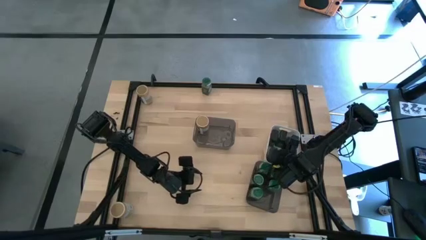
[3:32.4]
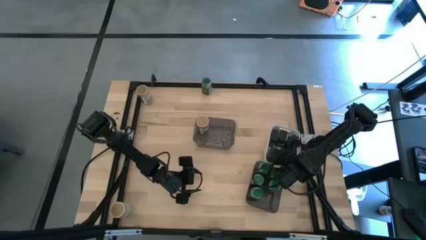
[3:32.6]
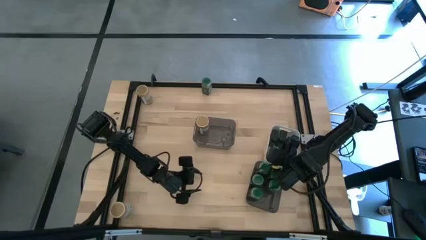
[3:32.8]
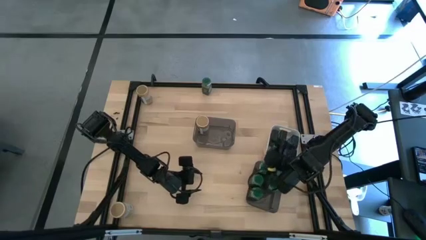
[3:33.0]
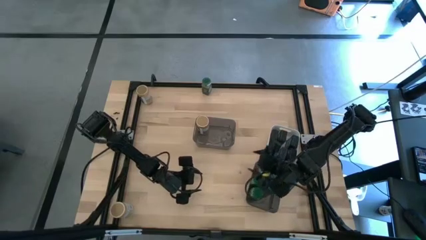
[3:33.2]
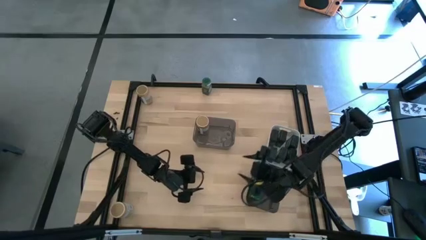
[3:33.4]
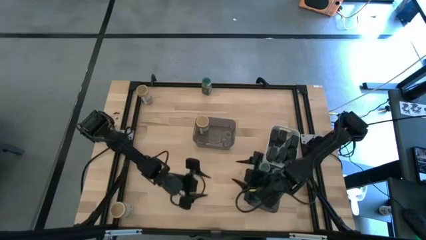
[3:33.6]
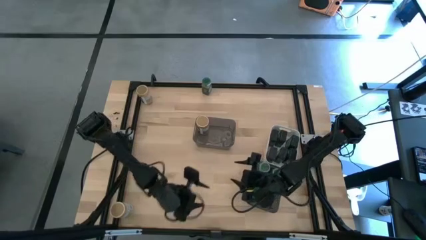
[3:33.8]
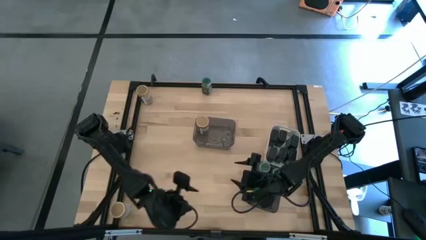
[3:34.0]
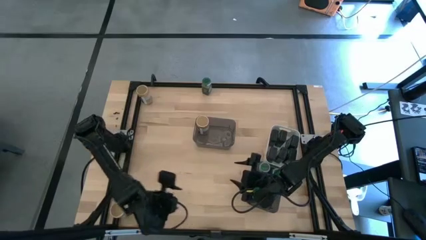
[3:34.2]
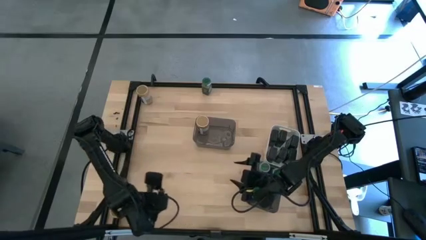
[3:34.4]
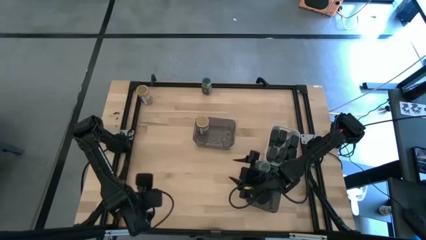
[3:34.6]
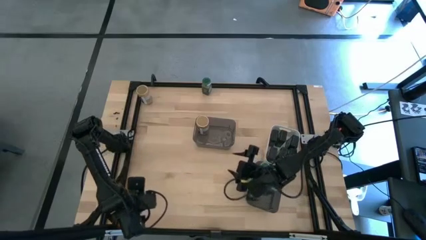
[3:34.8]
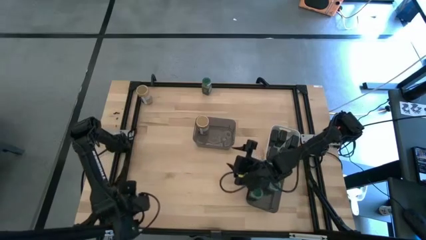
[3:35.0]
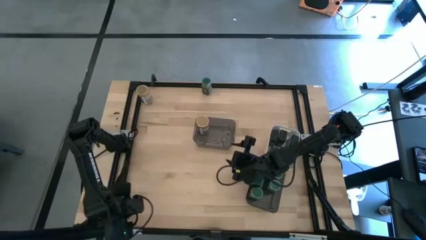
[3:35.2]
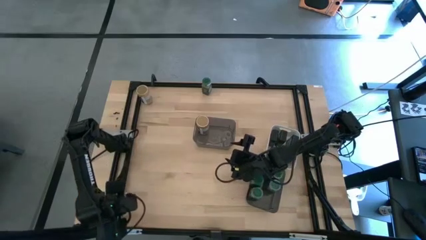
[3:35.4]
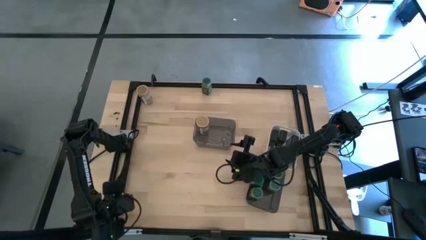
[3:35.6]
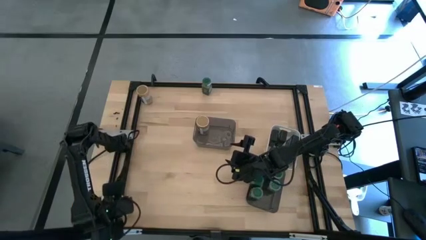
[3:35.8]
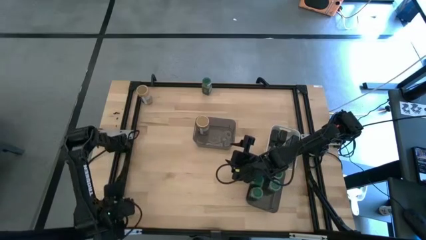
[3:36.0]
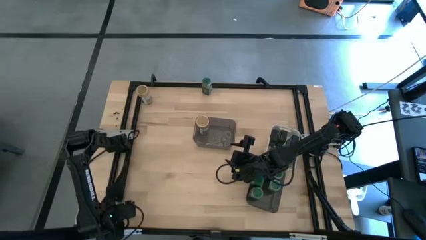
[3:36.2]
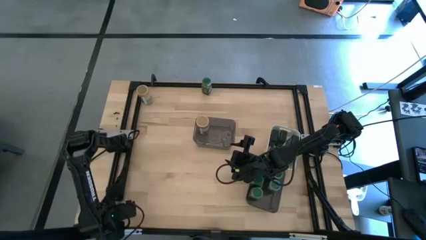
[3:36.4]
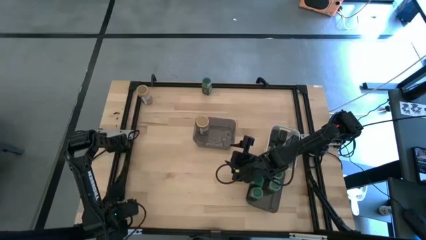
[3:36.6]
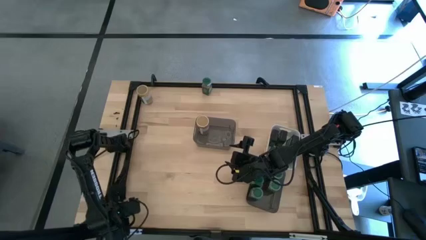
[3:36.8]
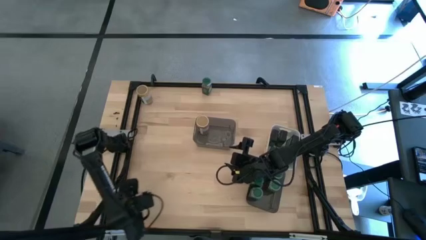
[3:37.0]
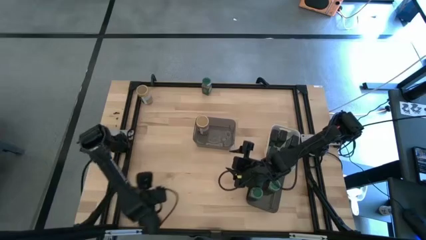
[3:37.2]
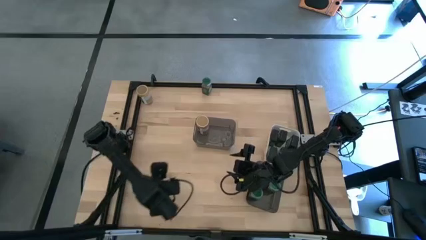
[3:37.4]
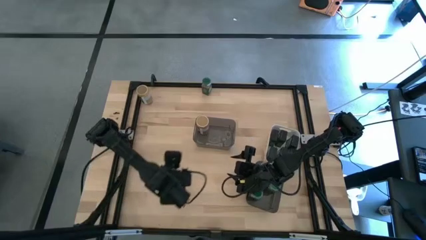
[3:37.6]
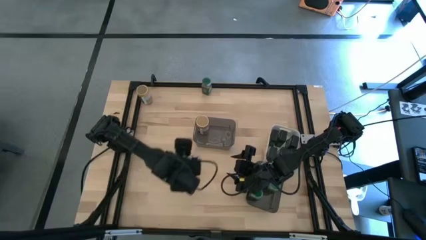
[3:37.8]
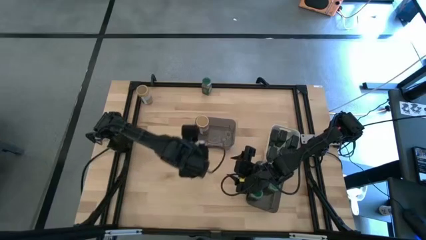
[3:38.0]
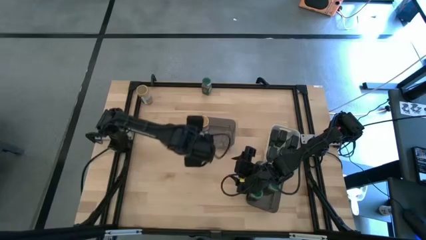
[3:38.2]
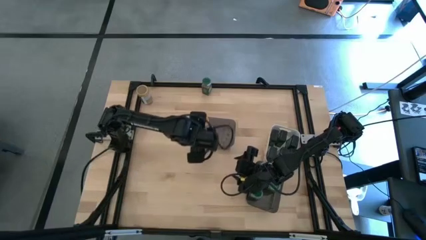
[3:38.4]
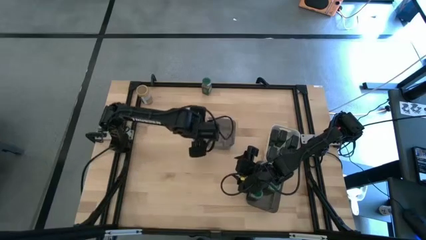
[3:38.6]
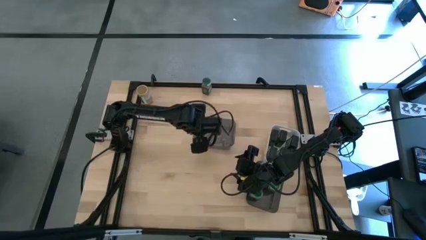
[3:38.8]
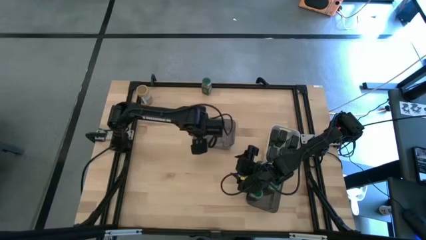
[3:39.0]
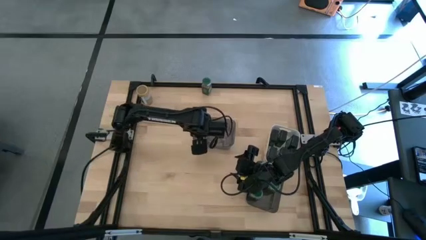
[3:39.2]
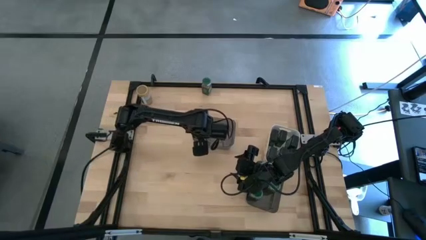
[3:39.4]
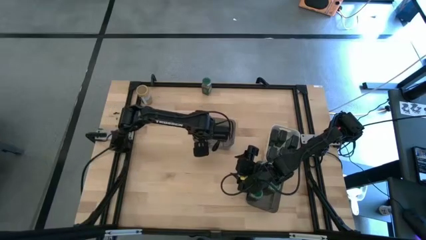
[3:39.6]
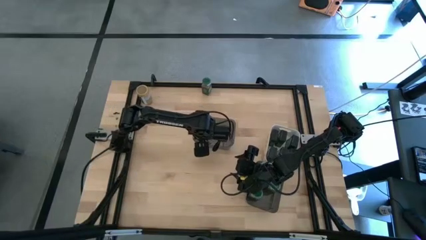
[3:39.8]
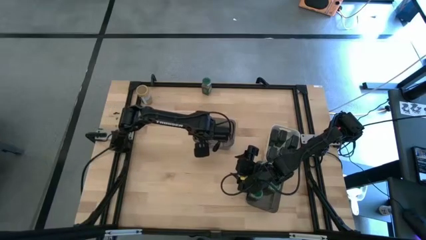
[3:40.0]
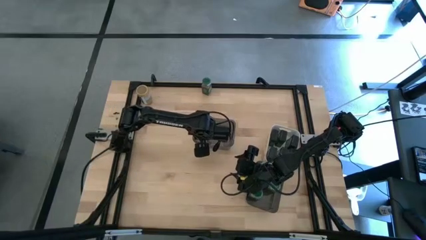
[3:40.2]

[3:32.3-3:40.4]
Task: Sort spices by type
Put the bottom brown seasoning bottle into the top black bin

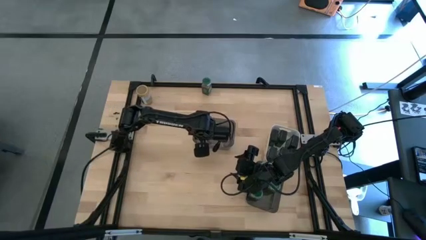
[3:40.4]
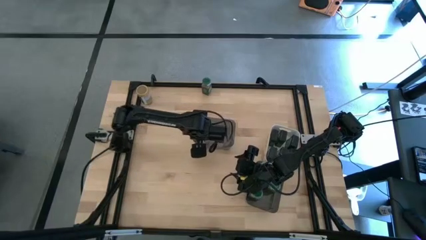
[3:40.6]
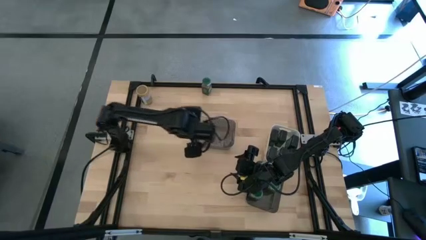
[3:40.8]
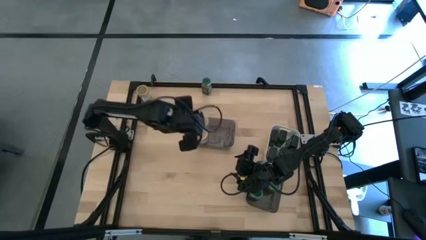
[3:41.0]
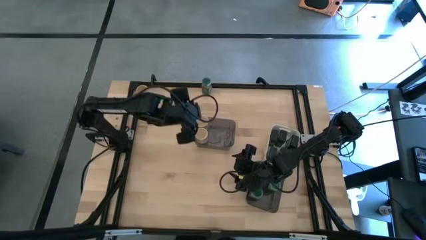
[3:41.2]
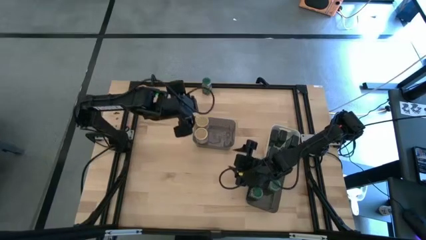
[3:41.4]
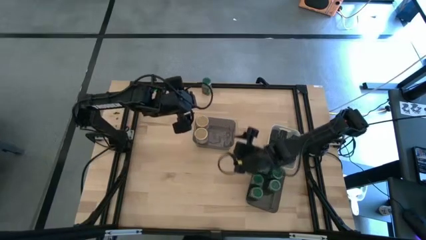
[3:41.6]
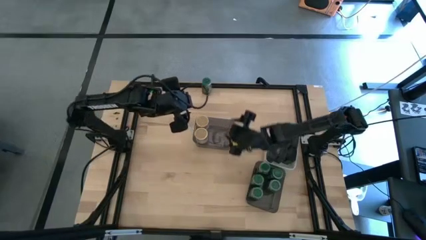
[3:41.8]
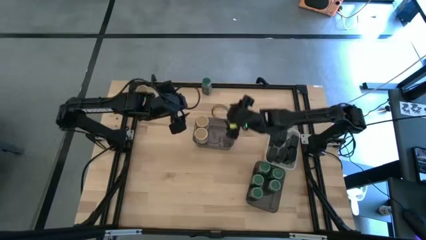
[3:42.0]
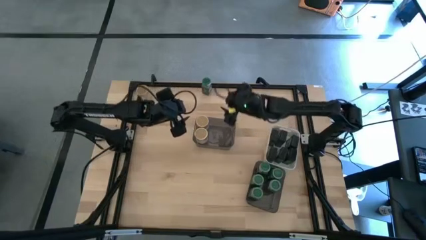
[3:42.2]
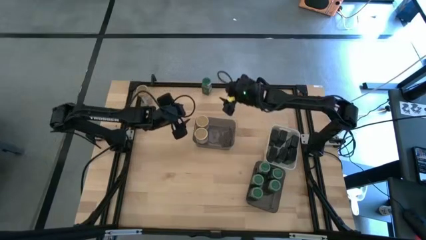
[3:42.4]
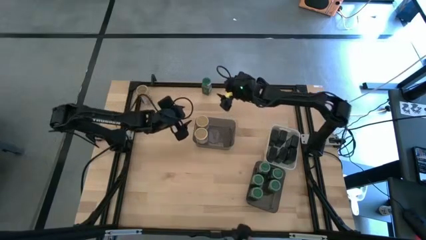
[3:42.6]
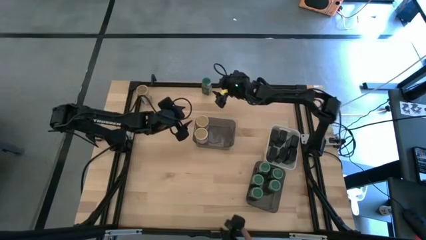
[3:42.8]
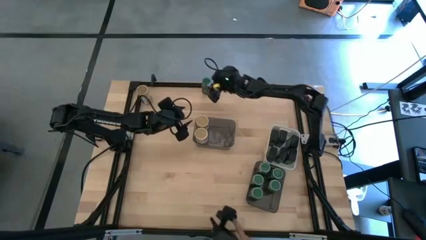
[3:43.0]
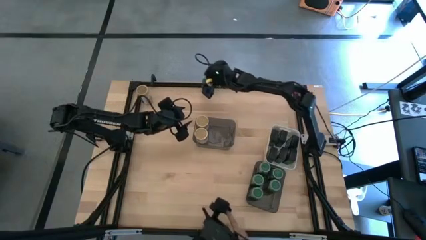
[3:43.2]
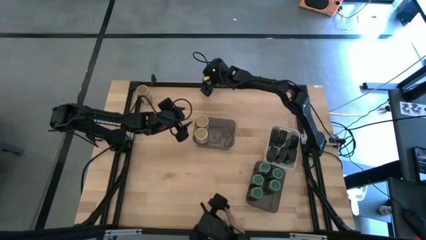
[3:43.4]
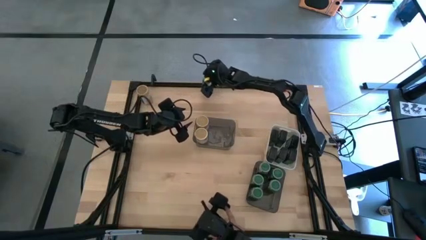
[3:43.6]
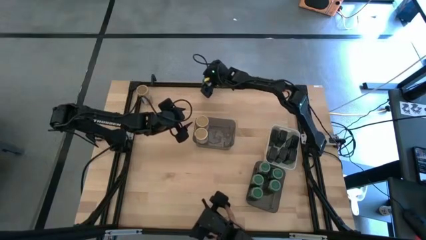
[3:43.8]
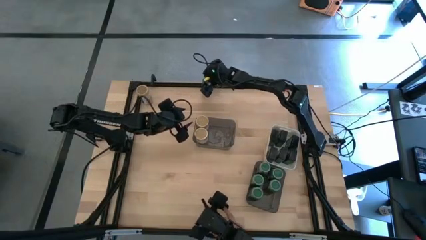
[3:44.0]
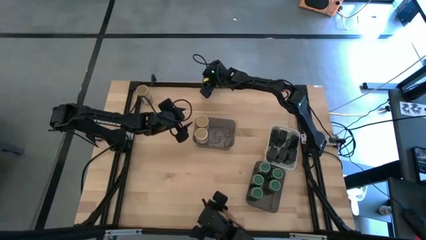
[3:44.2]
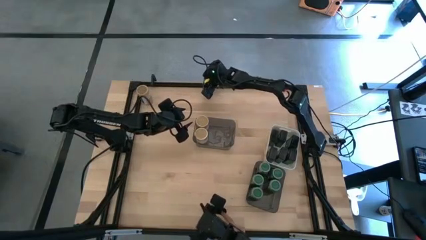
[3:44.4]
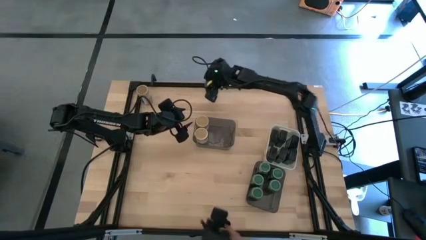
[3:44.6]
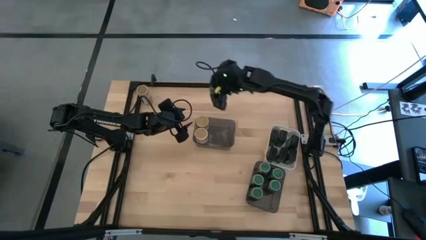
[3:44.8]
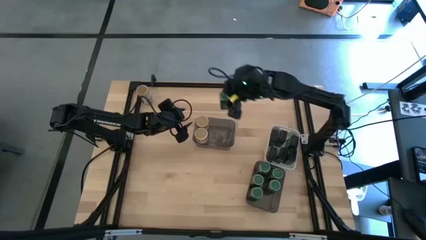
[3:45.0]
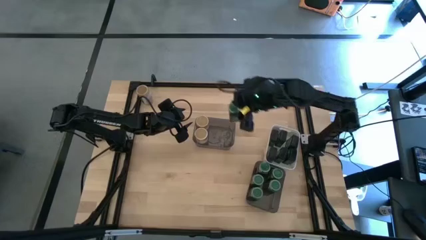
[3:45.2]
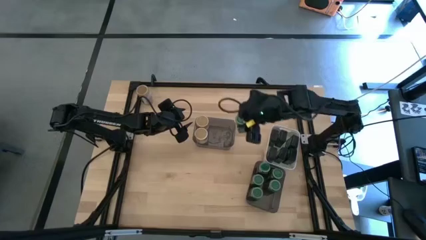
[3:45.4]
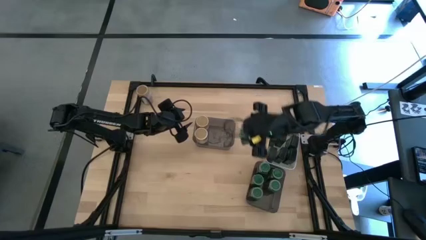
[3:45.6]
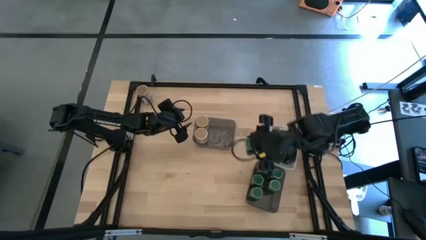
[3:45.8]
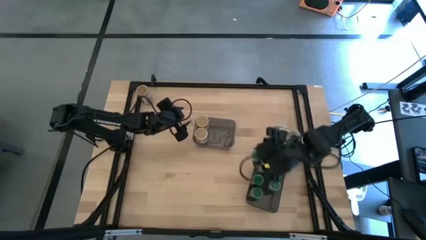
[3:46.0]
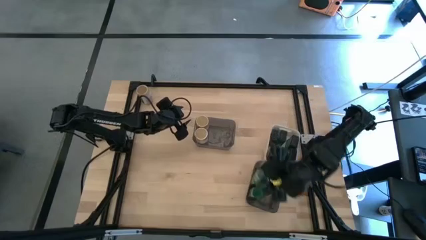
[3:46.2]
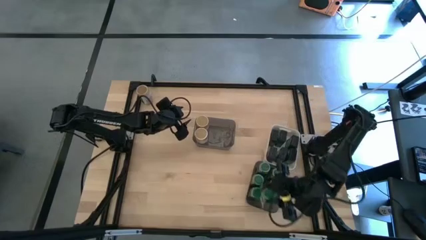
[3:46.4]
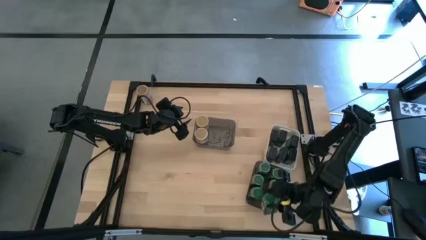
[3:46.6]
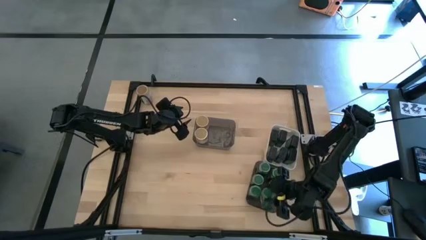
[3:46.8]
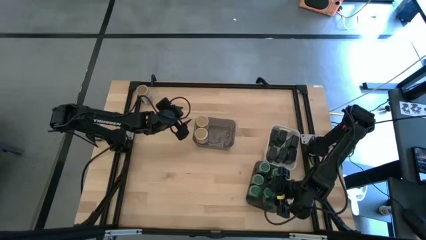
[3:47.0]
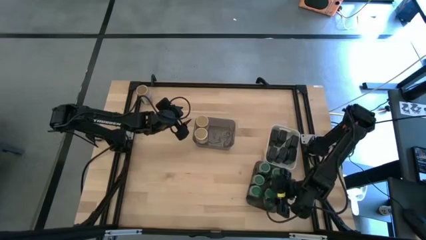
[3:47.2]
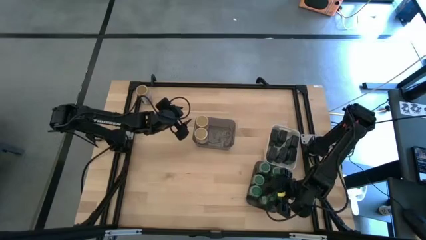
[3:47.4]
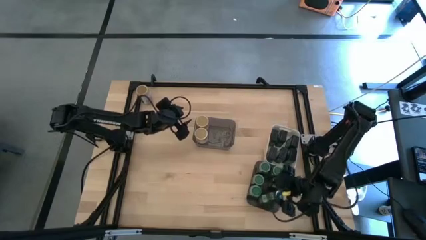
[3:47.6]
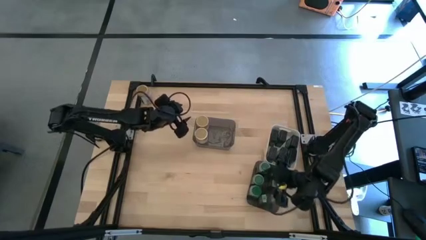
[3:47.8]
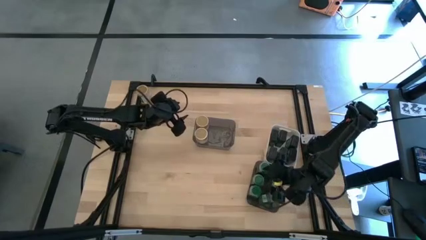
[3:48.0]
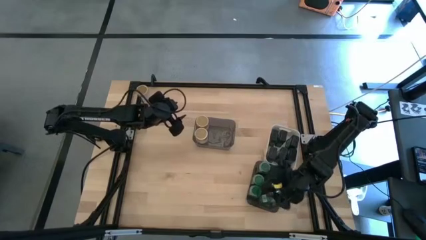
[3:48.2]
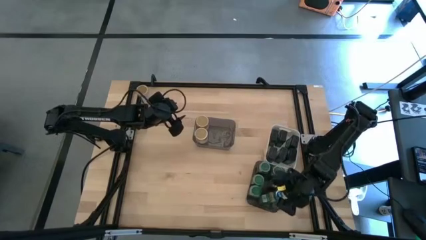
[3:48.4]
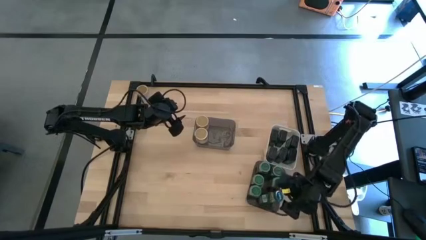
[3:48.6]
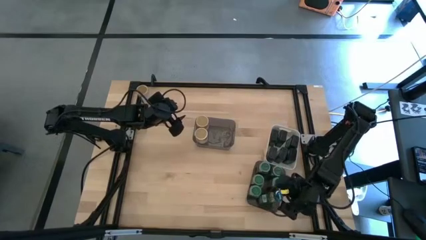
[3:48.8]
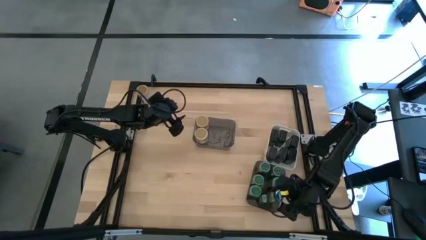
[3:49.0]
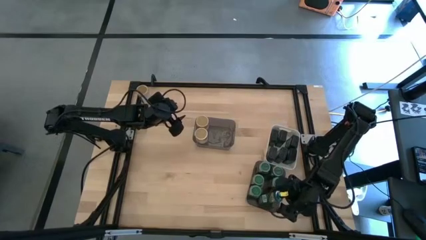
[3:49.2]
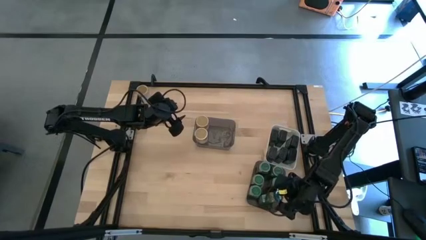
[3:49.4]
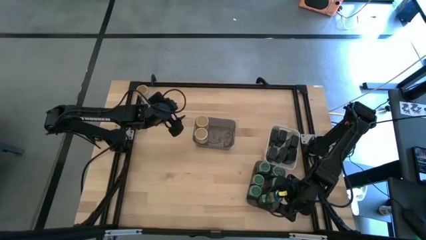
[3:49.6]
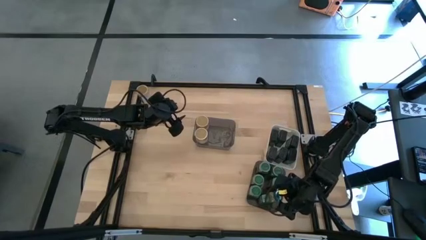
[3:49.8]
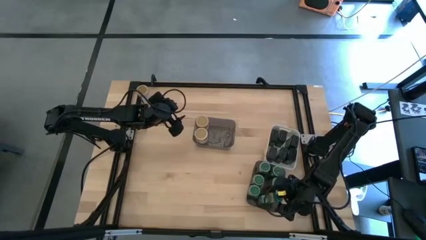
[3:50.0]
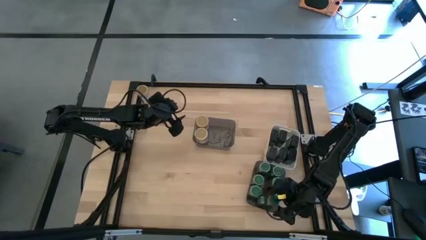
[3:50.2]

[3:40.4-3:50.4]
Put the green seasoning bottle into the bottom black bin
